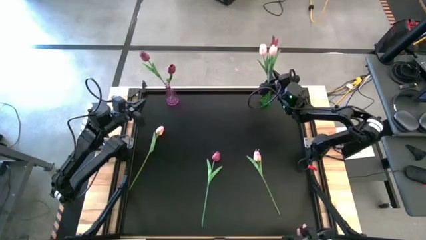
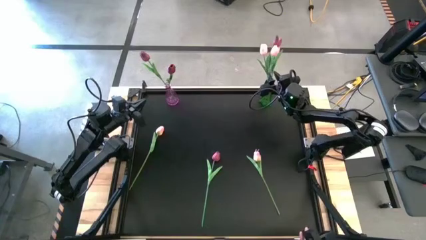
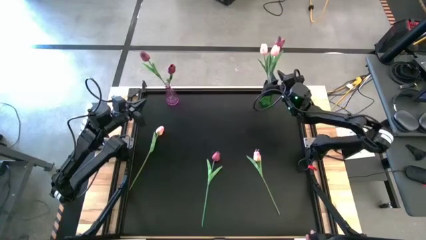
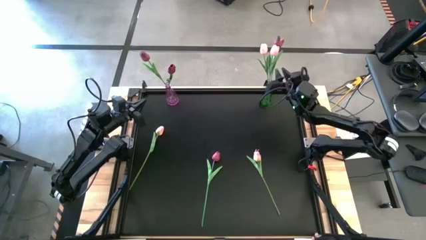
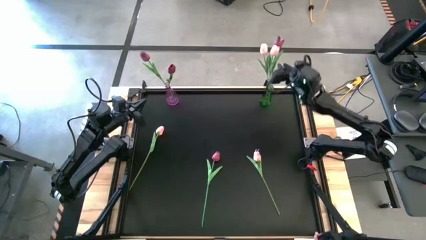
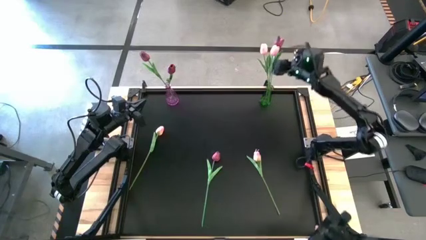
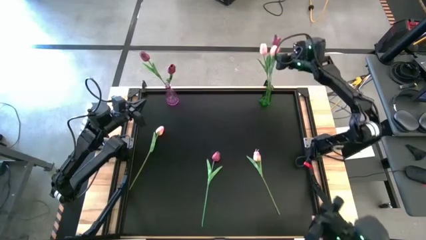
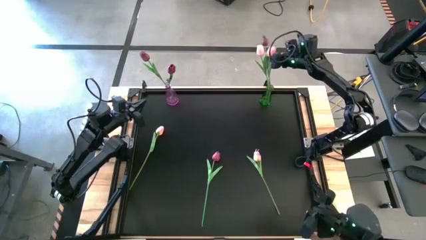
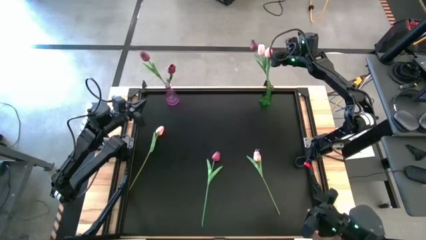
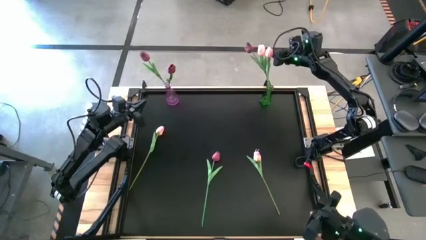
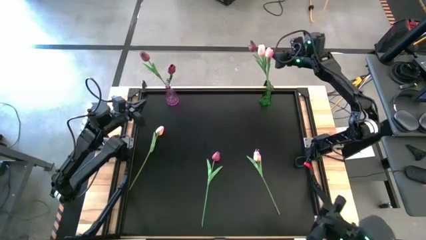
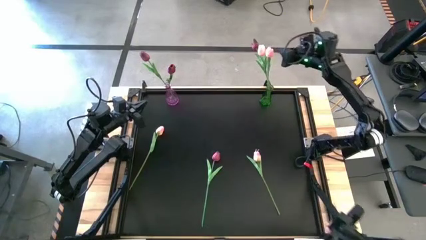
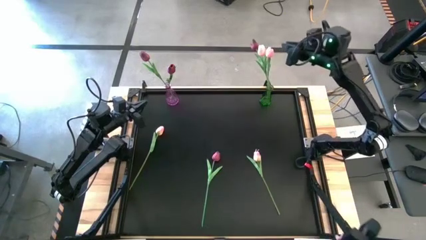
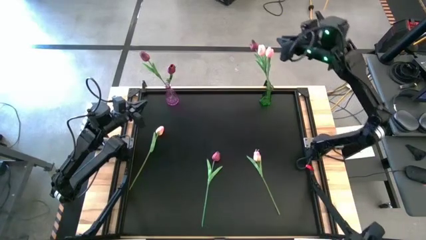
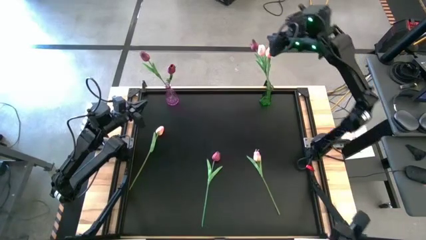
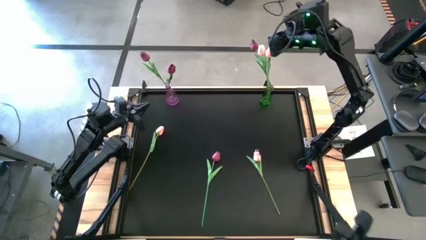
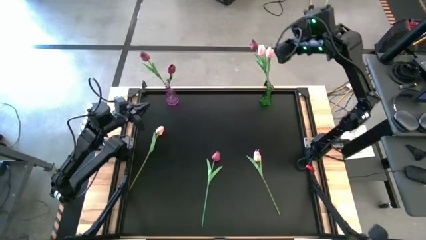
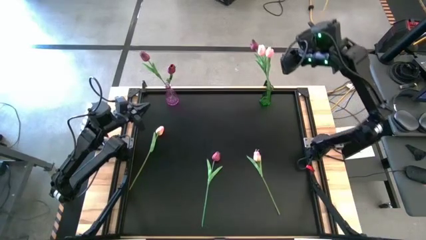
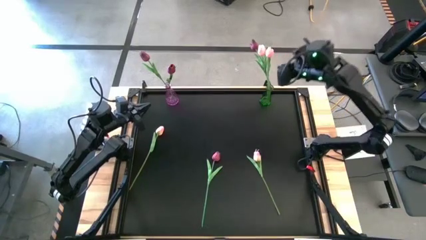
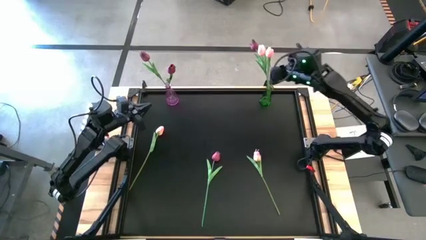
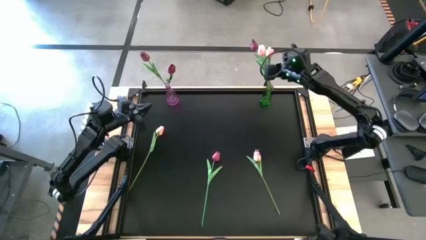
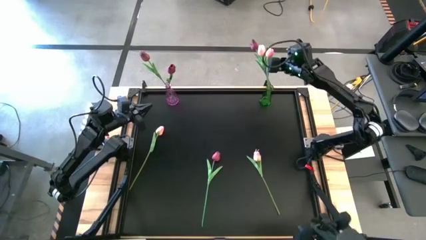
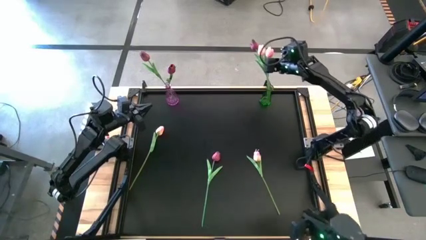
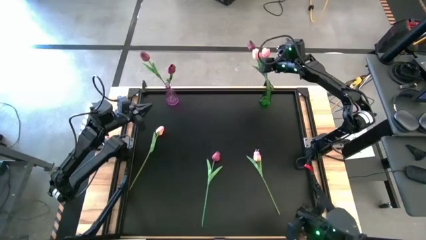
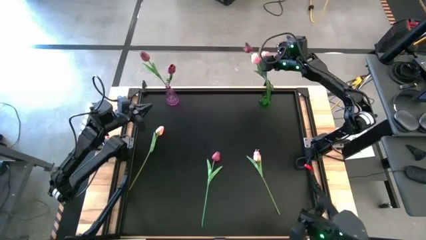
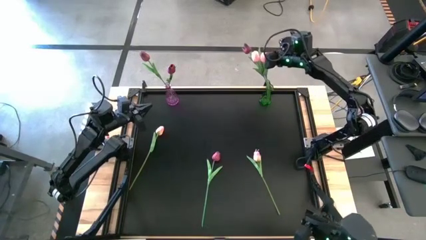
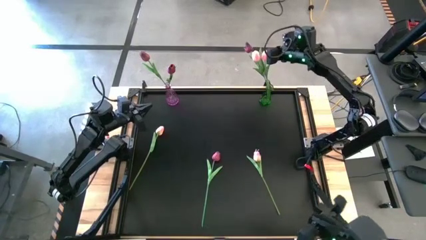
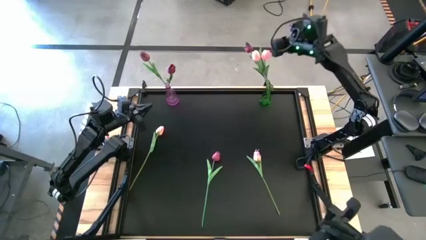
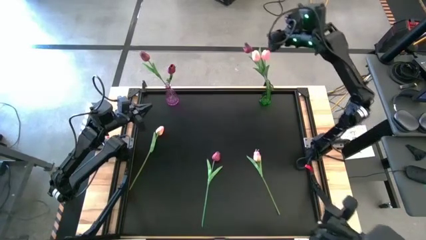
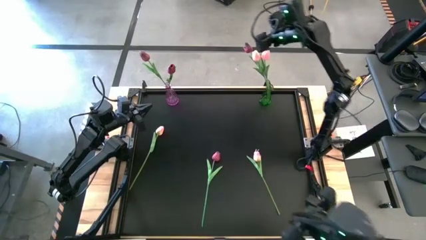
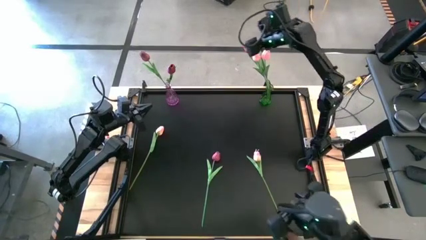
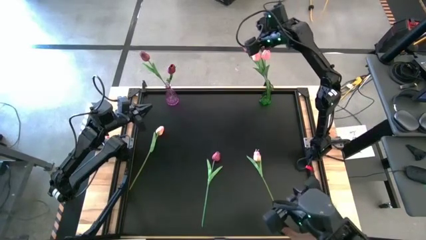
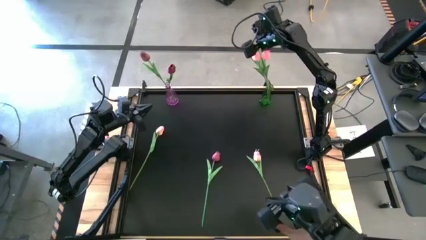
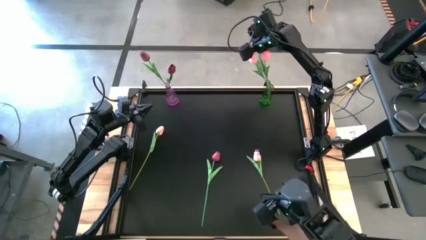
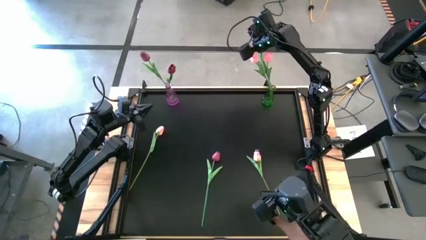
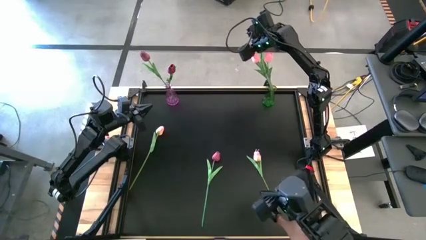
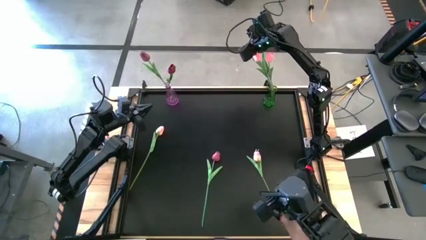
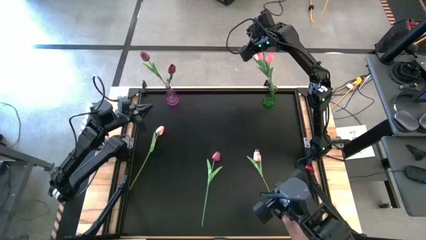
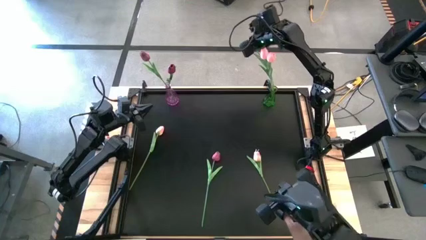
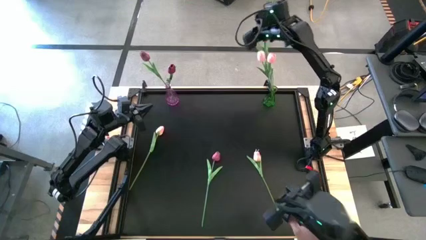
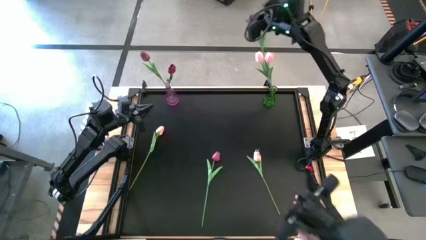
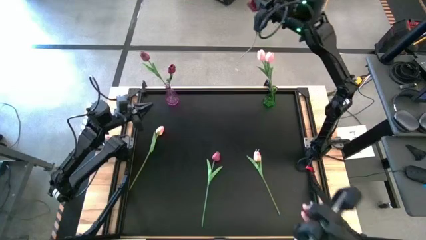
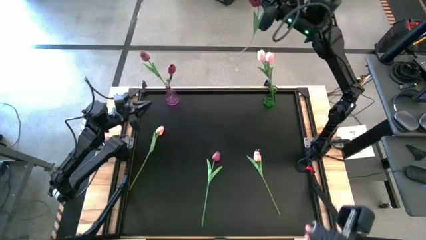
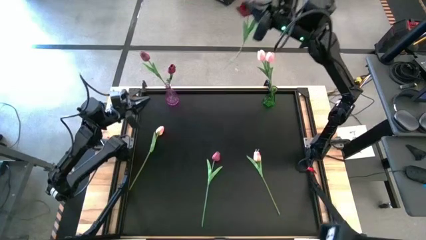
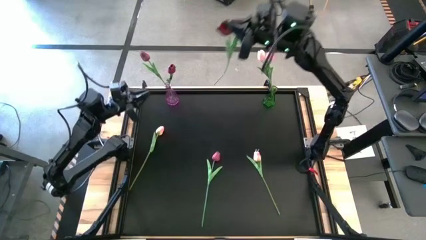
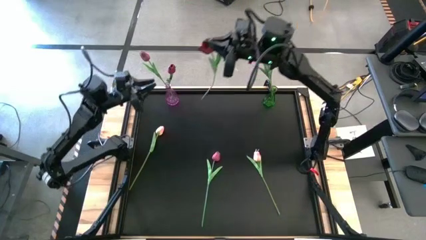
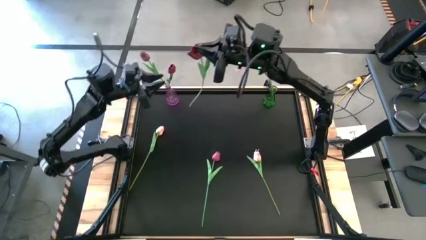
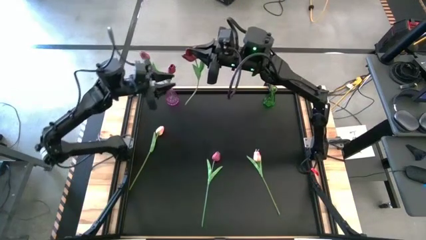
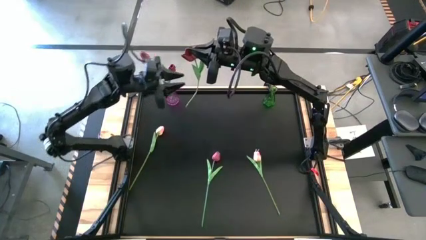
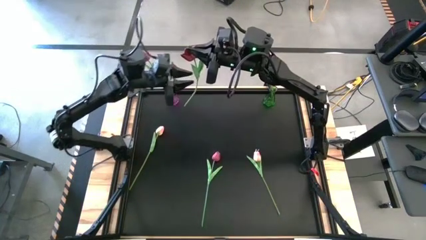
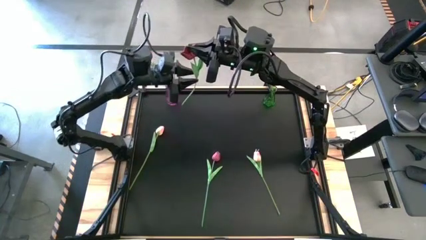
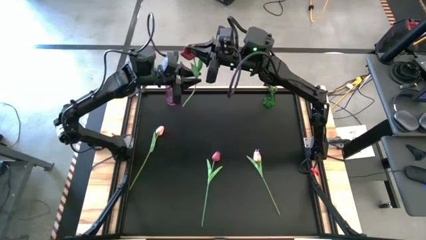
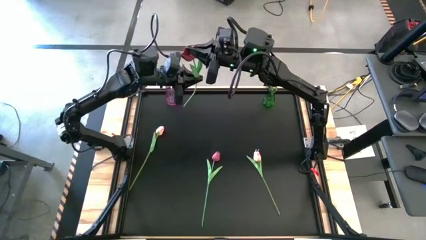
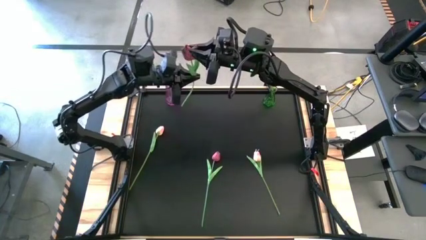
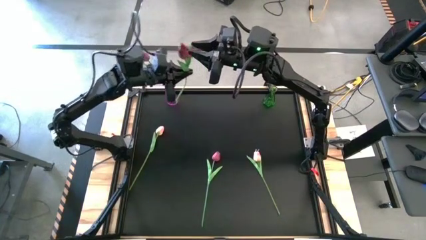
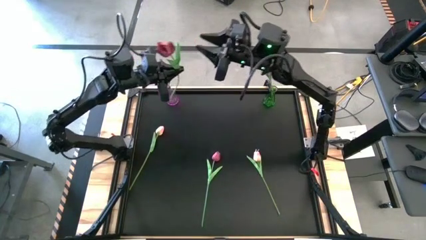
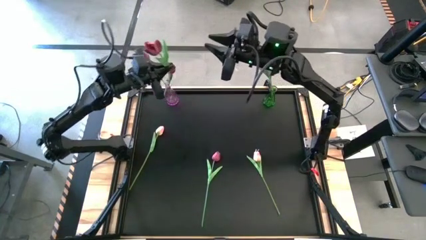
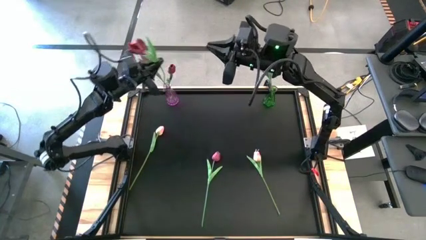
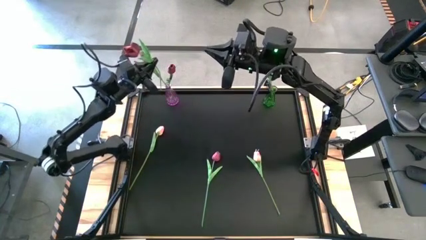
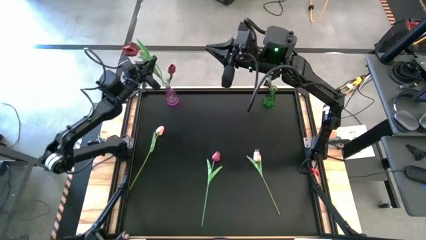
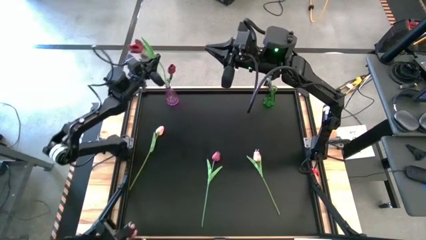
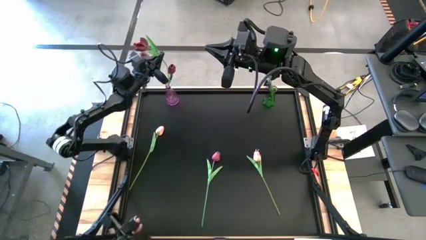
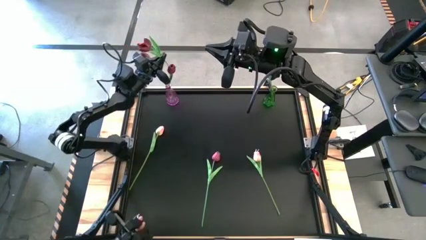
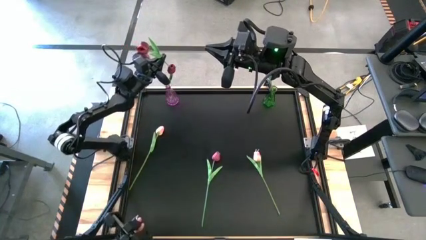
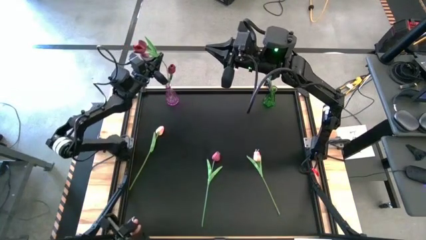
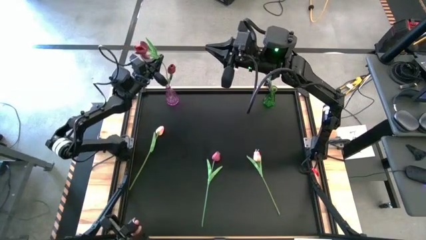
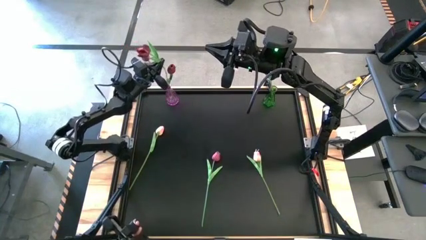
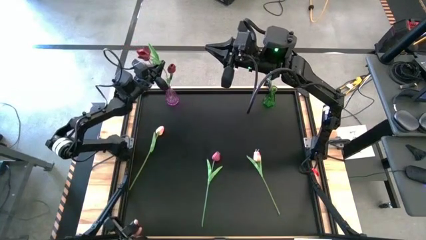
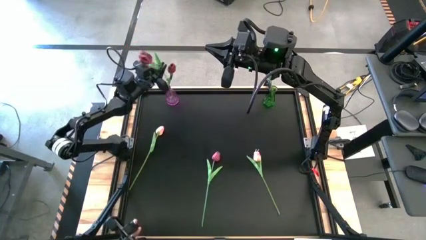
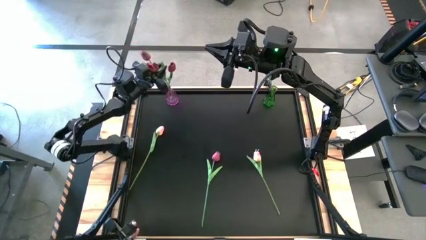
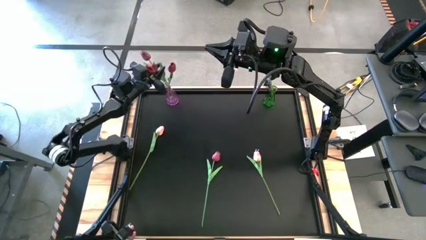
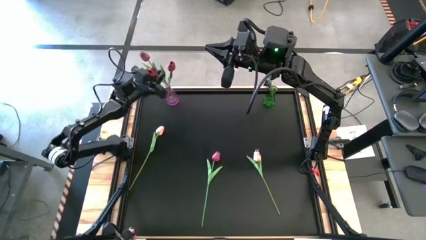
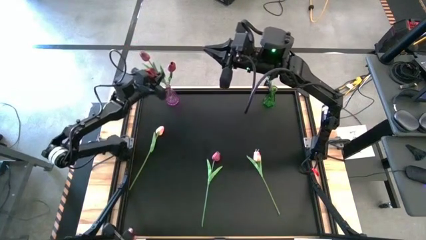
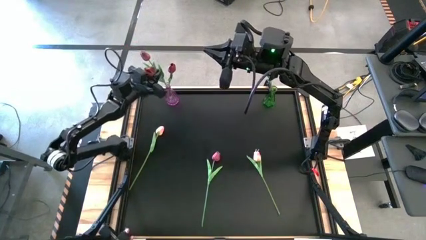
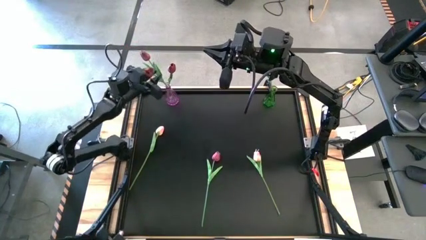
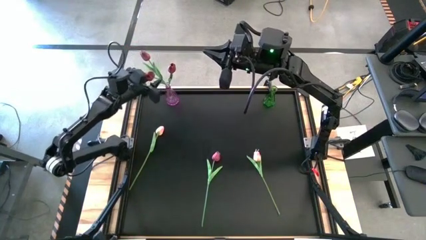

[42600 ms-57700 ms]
Task: Sort flowers into vase by color
Put the top red flower into the purple vase
